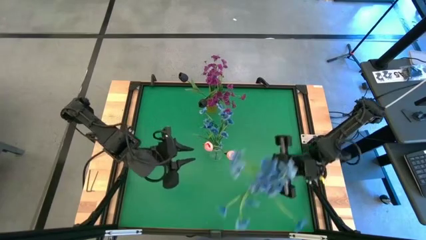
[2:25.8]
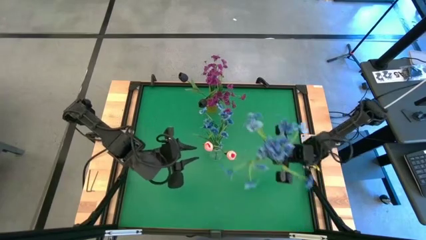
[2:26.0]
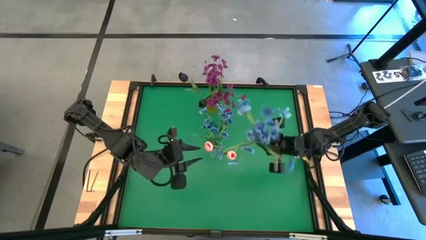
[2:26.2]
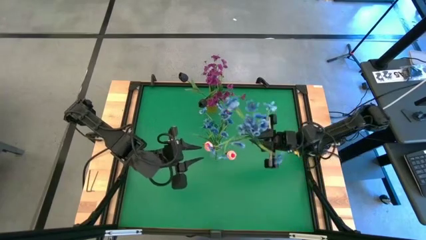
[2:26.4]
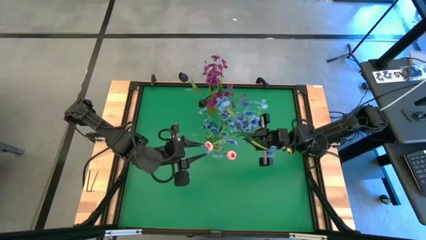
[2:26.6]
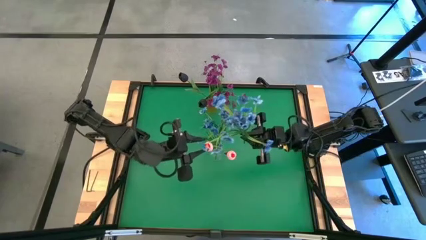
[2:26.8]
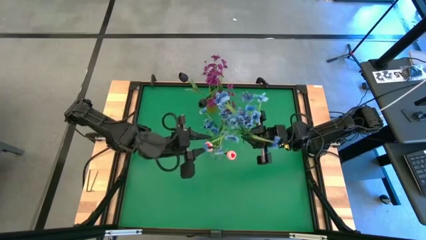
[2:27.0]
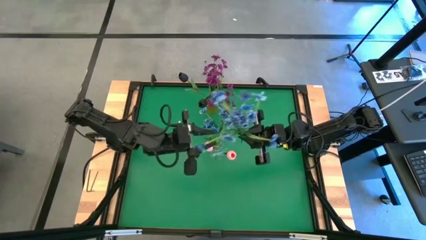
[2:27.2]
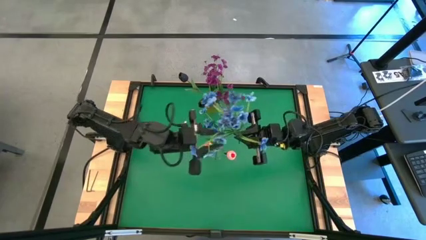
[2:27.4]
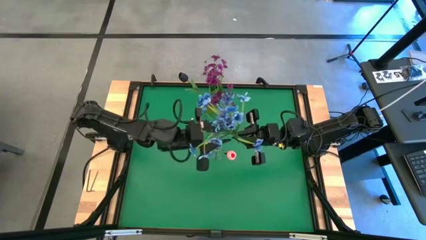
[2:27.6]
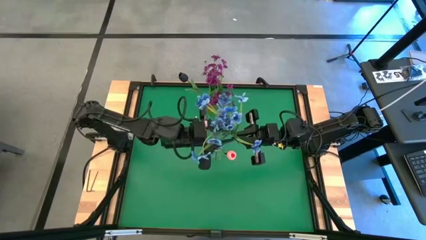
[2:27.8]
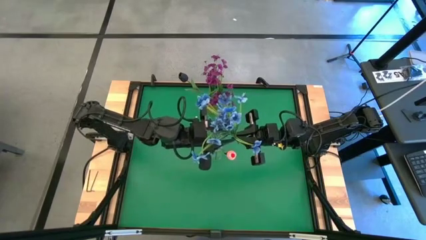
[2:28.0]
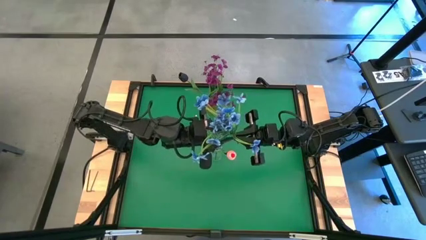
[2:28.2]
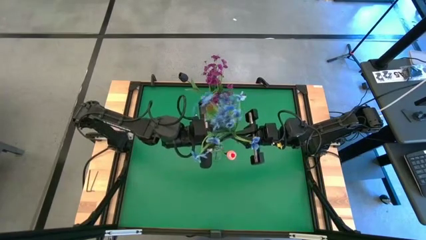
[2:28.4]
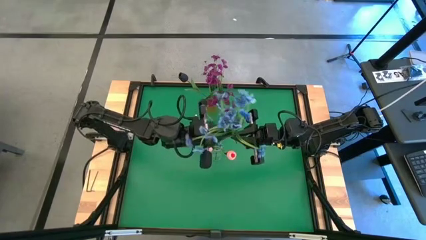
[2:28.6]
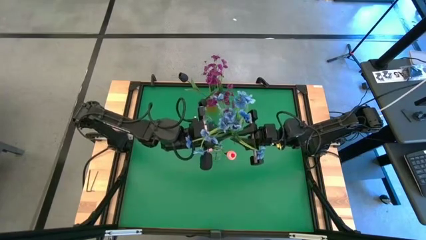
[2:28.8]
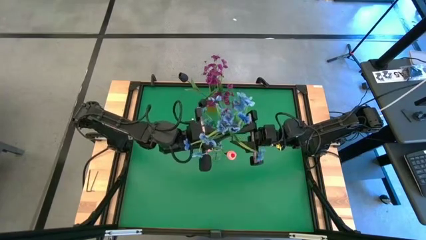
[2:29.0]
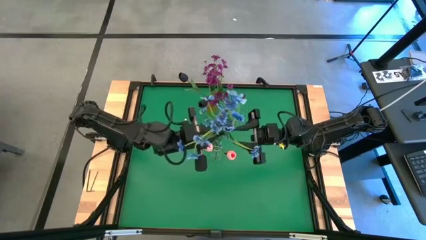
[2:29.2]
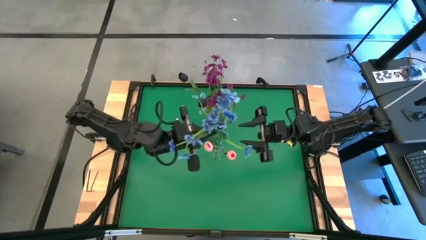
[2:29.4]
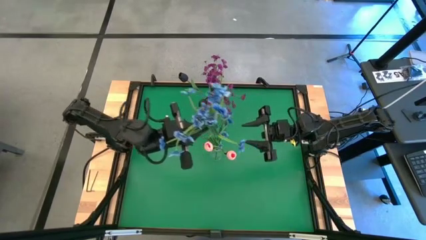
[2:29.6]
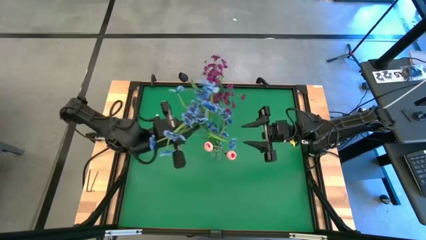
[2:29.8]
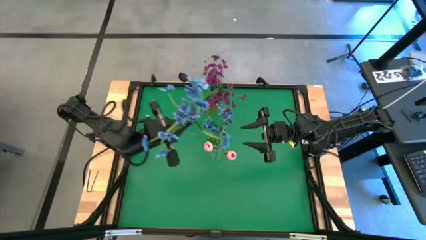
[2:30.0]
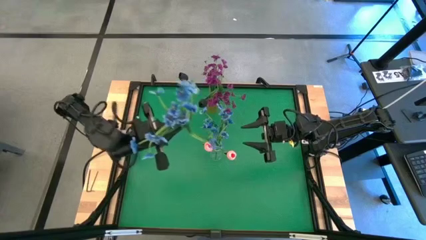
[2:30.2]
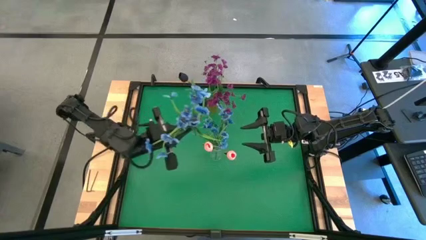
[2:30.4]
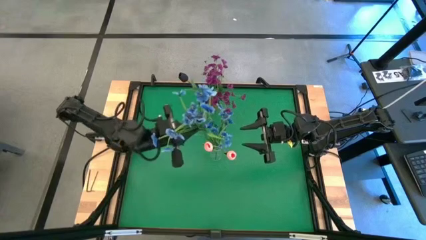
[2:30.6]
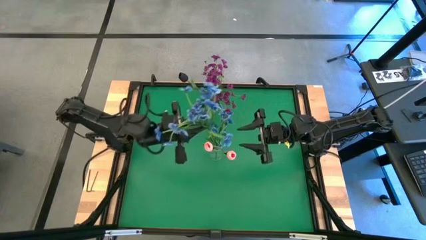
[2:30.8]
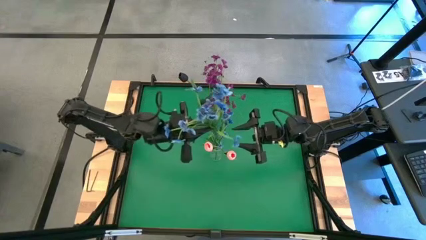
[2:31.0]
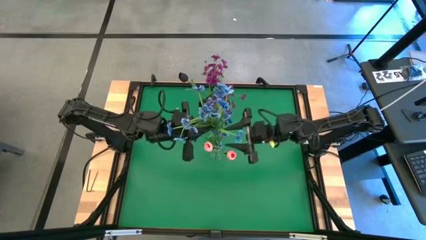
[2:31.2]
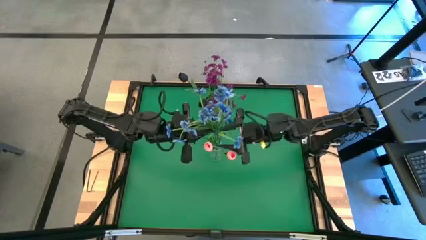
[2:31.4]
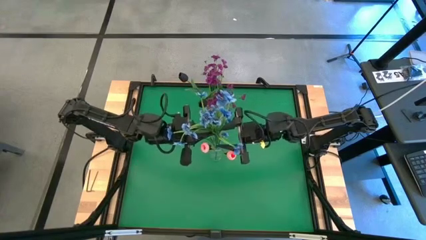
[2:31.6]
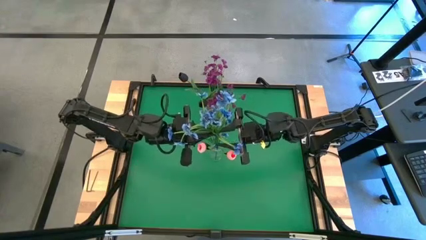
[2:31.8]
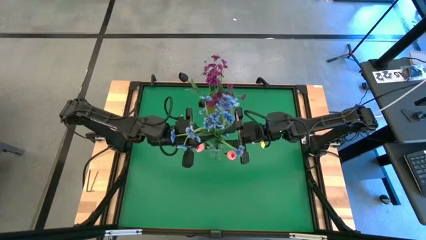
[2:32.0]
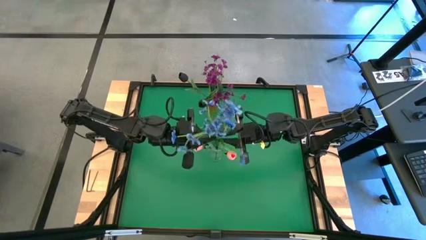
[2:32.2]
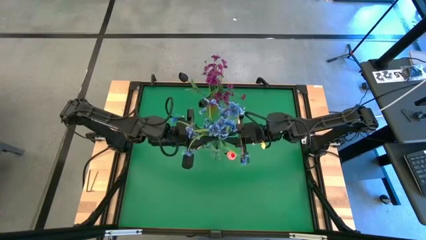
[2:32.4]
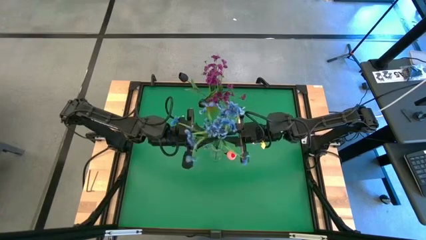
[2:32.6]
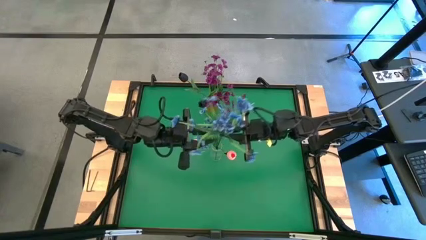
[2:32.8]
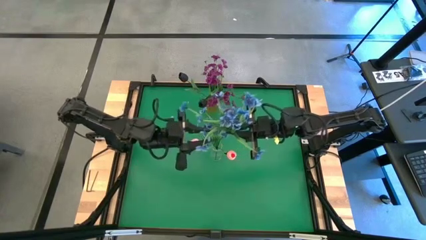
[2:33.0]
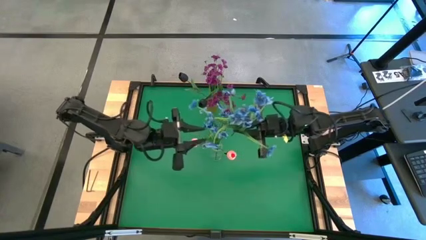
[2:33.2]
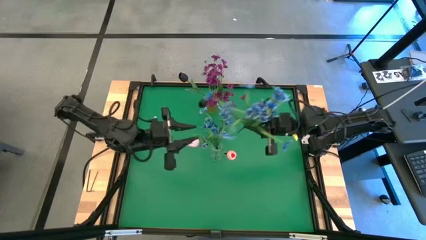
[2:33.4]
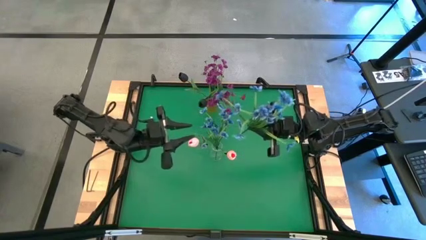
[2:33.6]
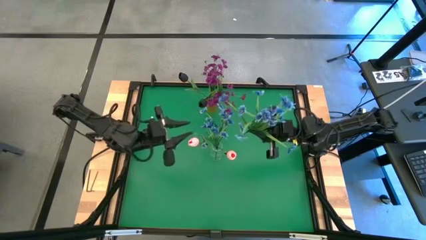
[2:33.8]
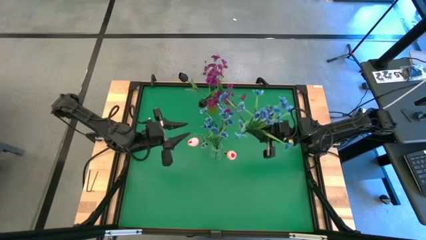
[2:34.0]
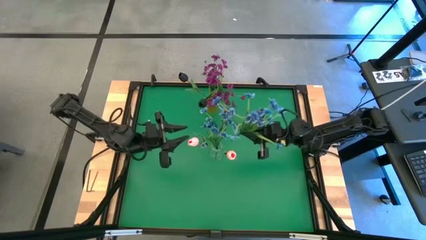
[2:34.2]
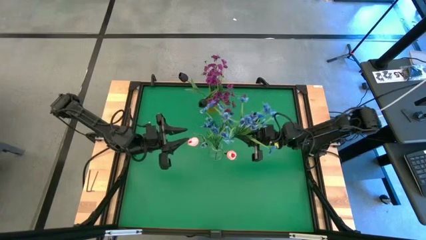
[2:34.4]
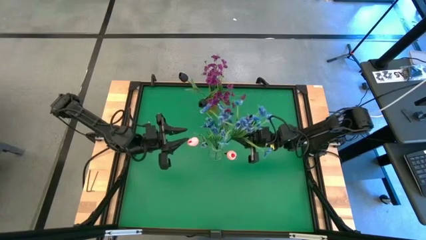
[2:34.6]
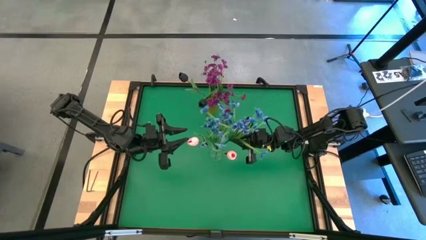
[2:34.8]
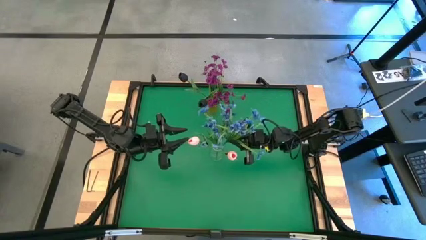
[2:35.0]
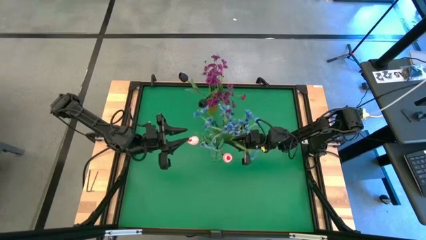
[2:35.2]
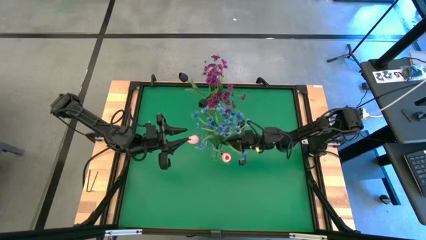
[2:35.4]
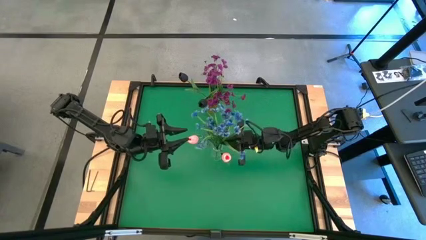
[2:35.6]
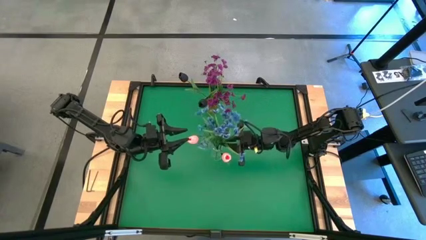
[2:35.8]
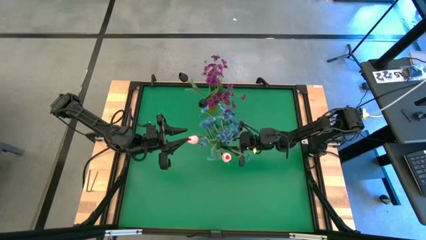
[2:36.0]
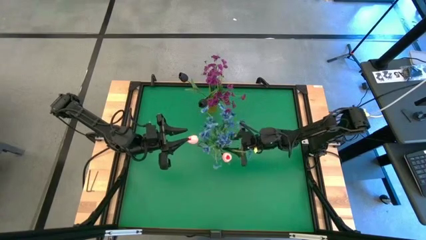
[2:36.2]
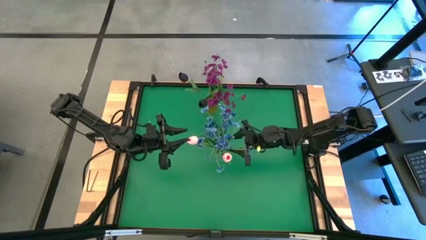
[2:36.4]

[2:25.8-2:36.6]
Task: Sort flowers into vase by color
Put the blue flowers into the transparent vase

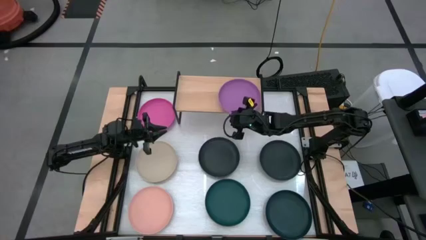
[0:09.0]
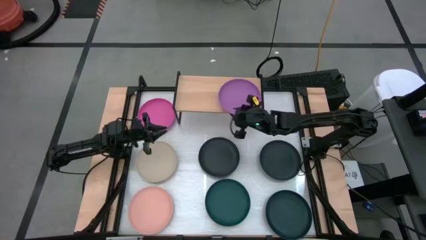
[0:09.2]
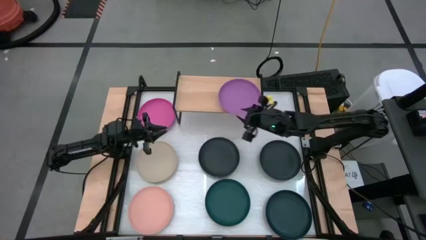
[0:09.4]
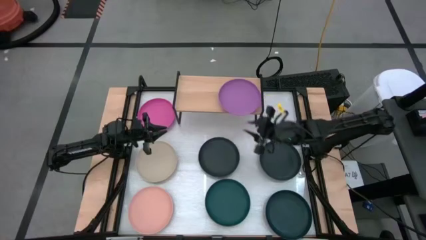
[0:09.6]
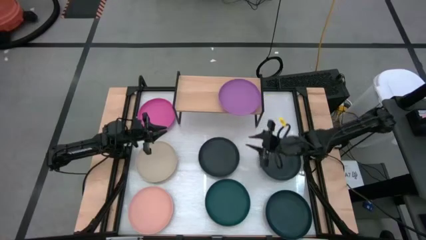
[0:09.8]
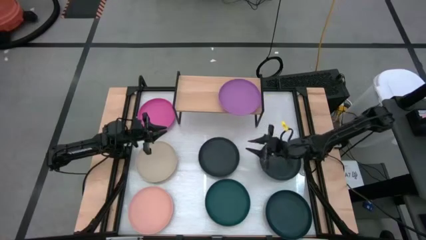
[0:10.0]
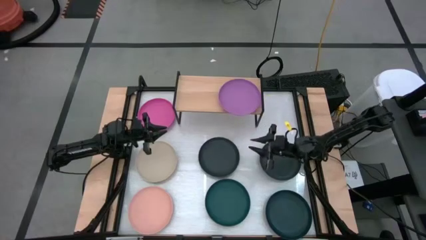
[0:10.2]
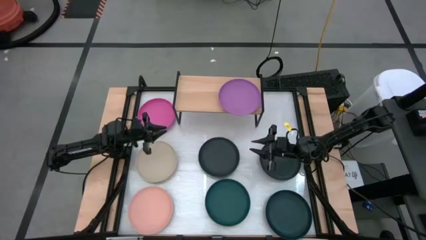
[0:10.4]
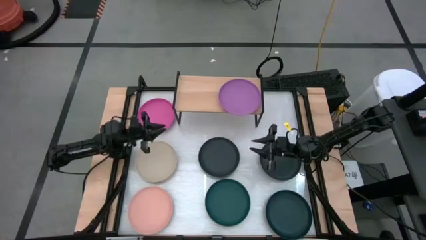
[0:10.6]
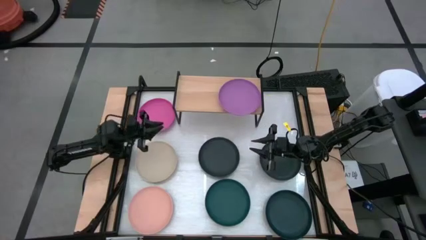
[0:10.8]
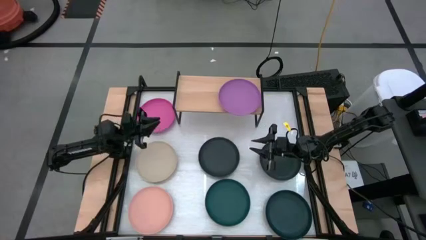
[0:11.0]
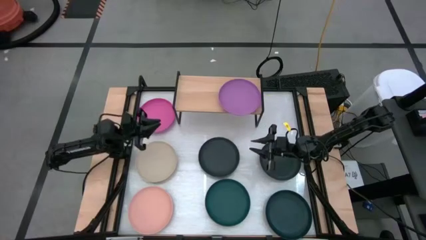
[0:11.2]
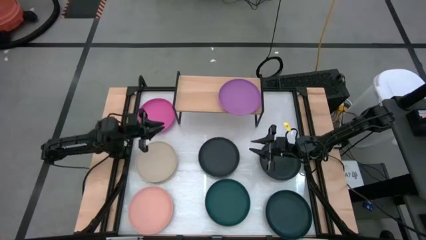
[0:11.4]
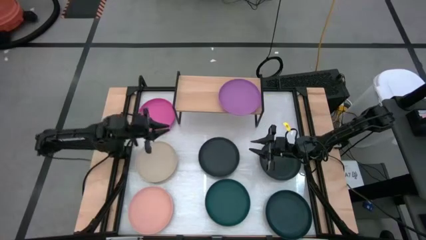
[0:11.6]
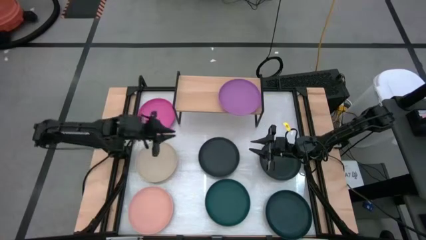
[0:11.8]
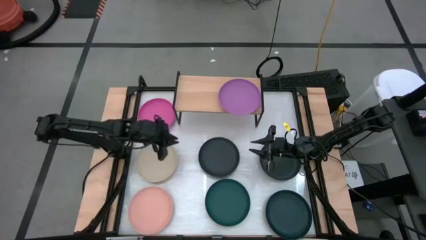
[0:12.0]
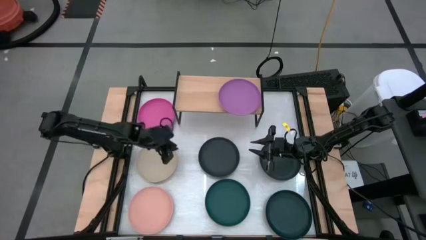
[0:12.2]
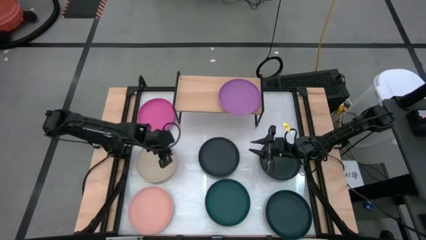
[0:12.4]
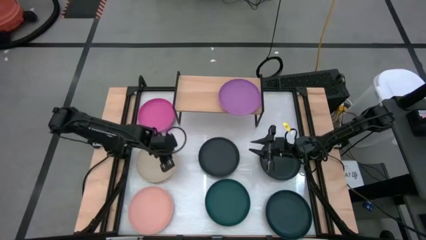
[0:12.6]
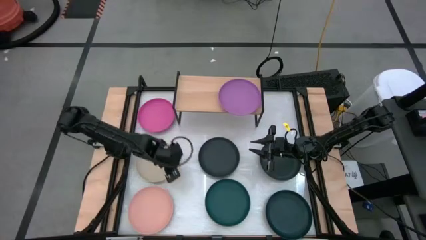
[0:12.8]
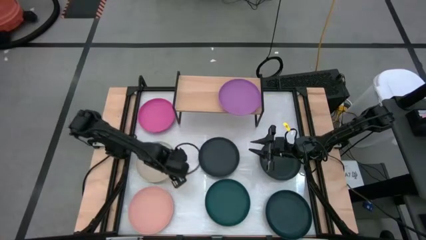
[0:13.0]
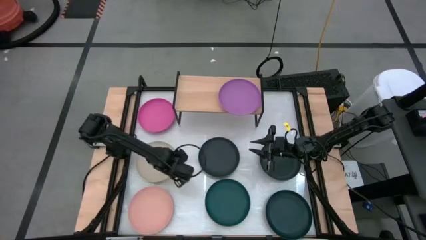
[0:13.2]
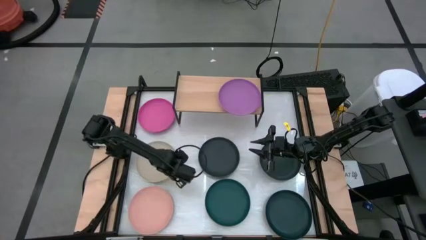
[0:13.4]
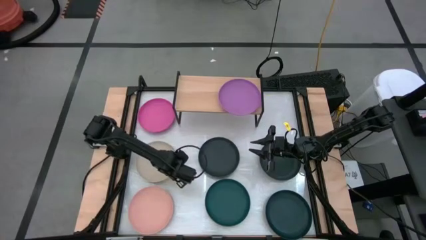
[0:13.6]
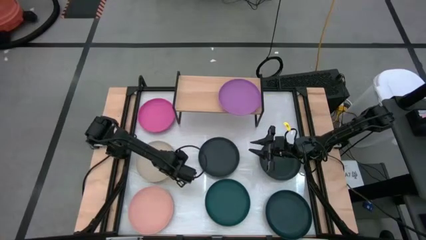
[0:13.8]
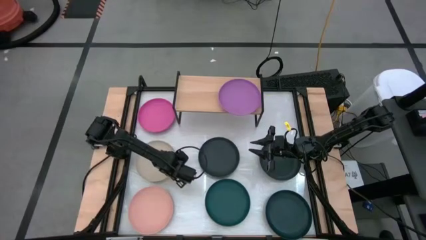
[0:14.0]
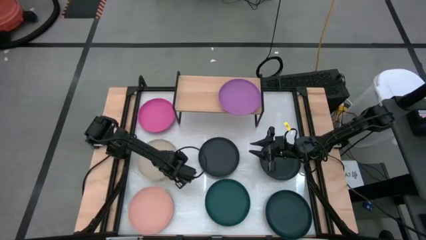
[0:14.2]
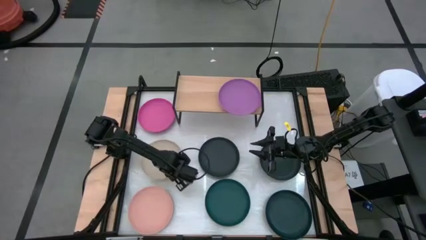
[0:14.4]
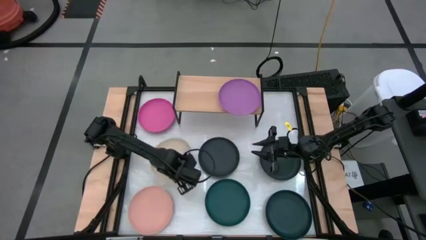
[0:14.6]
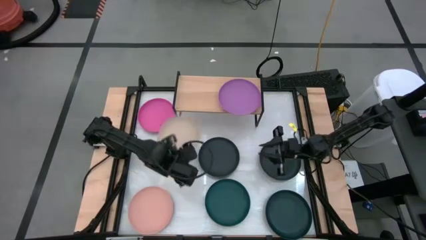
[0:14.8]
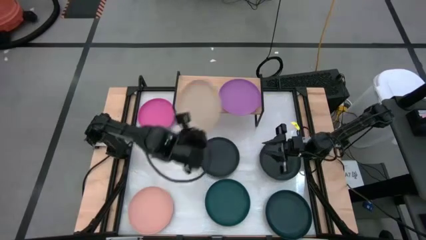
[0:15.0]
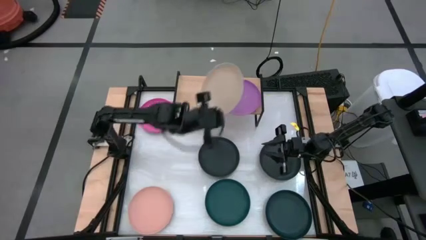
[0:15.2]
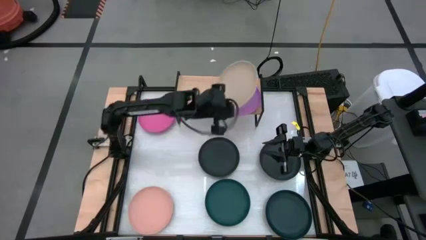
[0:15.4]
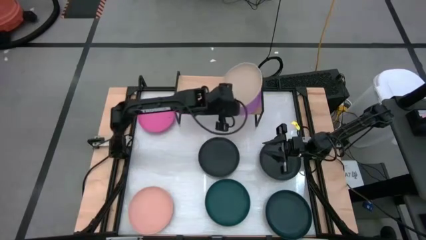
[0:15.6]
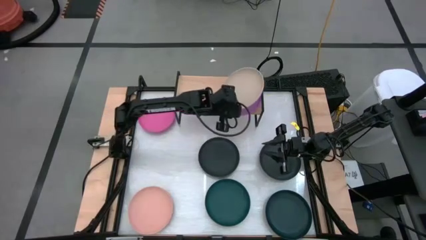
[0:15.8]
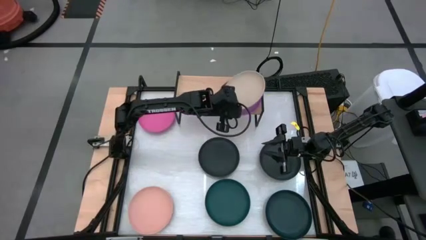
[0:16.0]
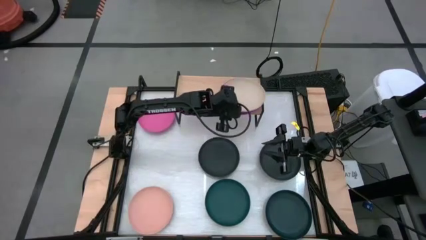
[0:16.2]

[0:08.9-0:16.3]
Task: Place and stack plates onto a shelf
Stack the gray plate on top of the purple plate on the shelf
